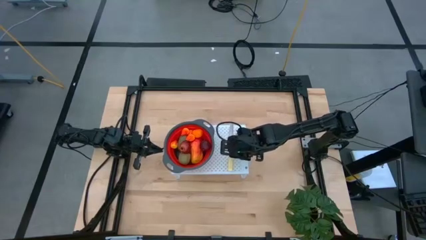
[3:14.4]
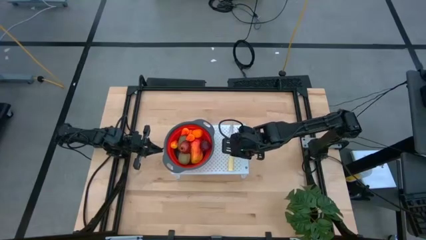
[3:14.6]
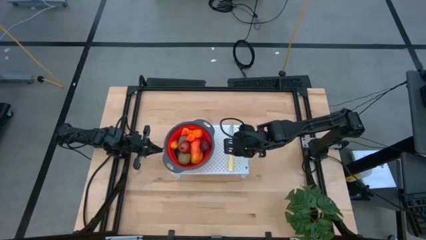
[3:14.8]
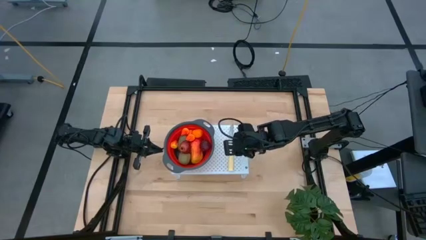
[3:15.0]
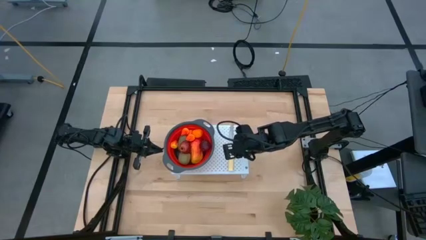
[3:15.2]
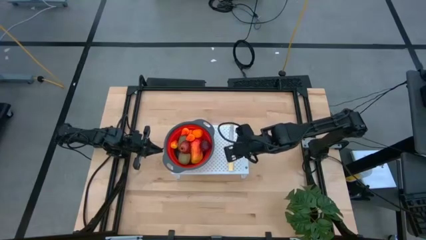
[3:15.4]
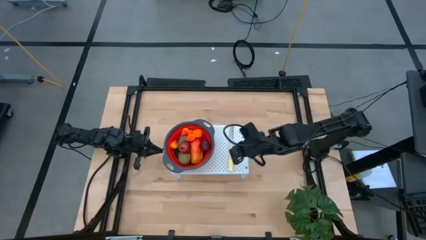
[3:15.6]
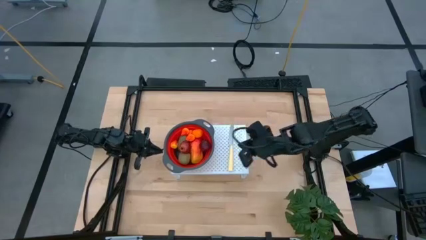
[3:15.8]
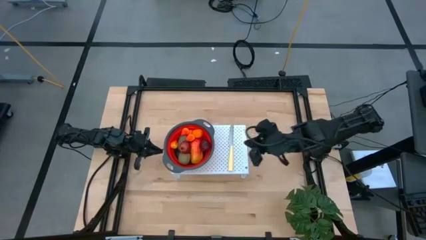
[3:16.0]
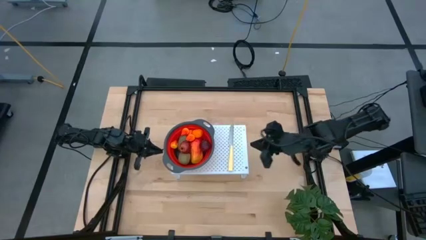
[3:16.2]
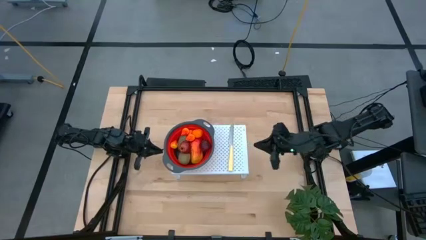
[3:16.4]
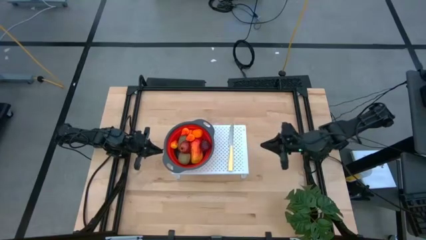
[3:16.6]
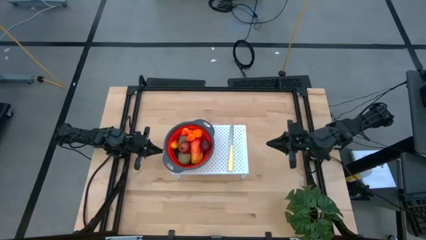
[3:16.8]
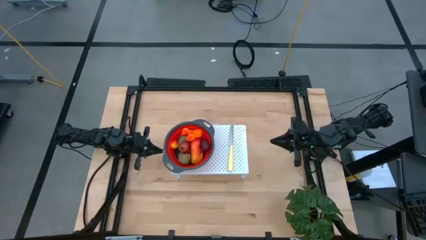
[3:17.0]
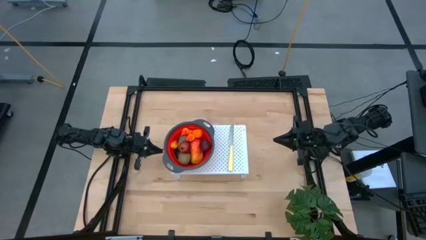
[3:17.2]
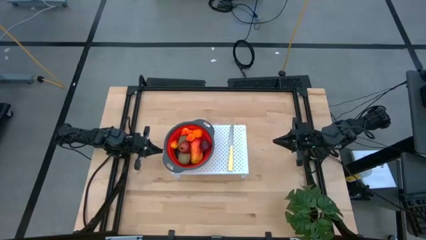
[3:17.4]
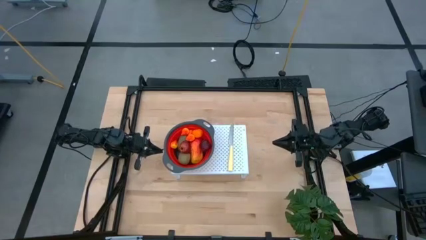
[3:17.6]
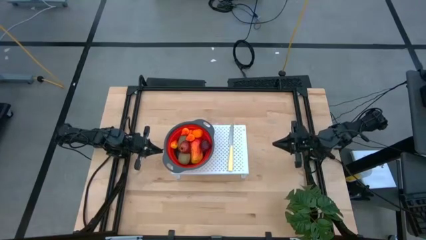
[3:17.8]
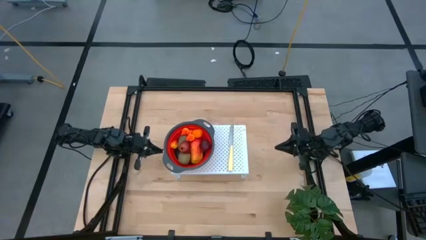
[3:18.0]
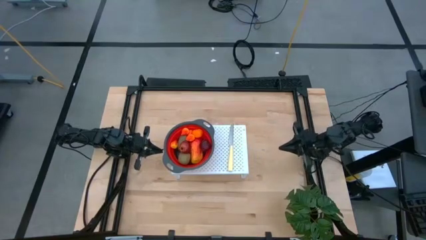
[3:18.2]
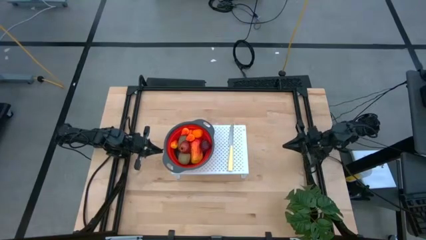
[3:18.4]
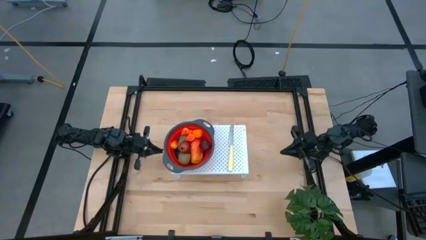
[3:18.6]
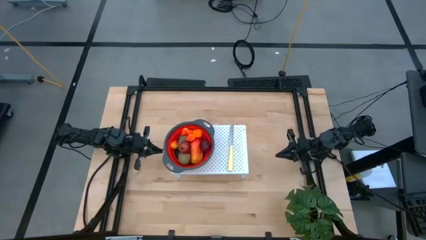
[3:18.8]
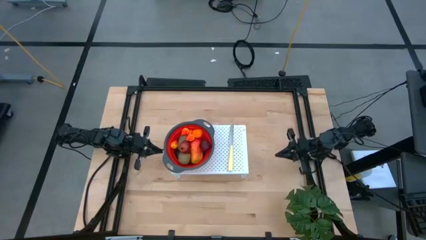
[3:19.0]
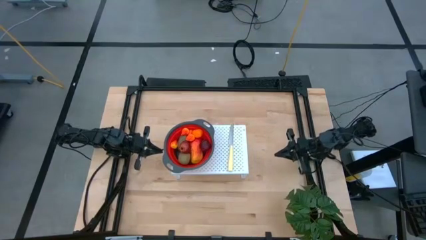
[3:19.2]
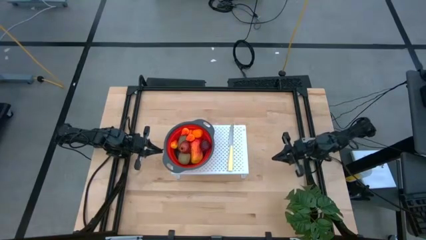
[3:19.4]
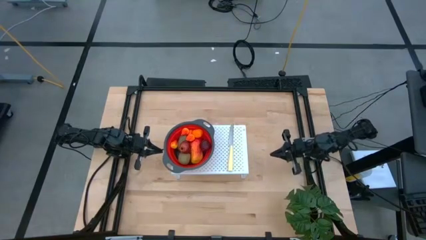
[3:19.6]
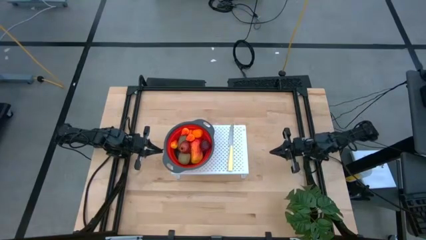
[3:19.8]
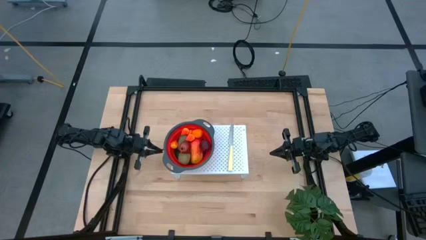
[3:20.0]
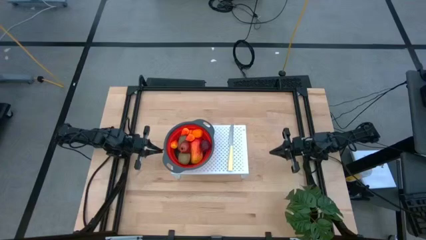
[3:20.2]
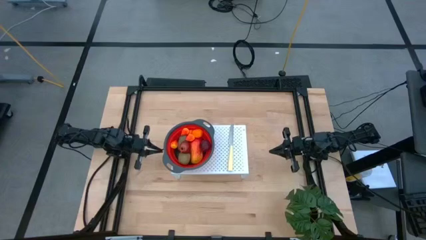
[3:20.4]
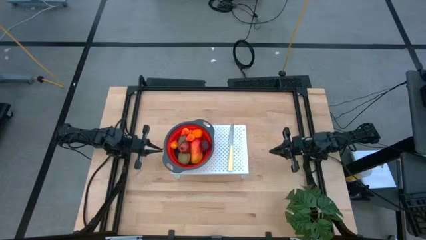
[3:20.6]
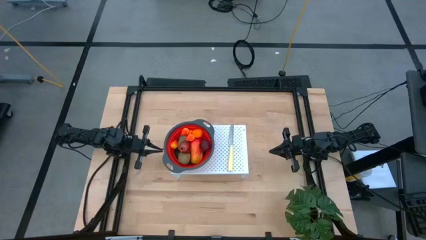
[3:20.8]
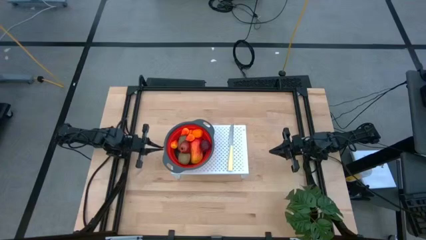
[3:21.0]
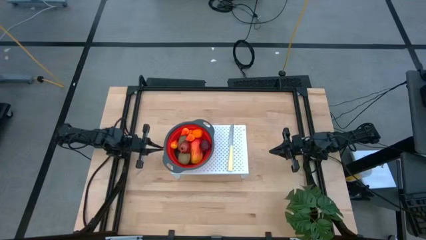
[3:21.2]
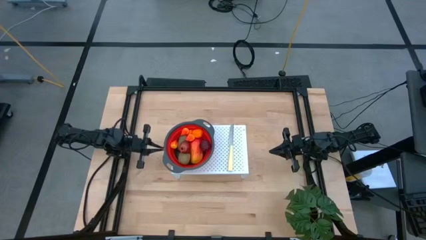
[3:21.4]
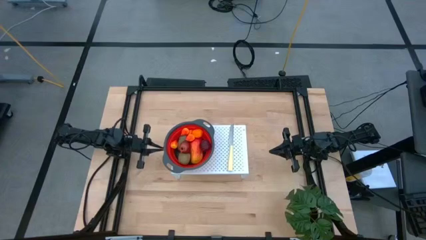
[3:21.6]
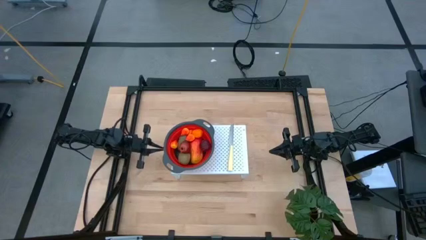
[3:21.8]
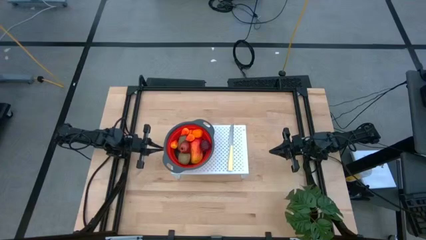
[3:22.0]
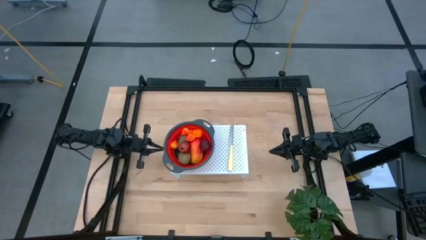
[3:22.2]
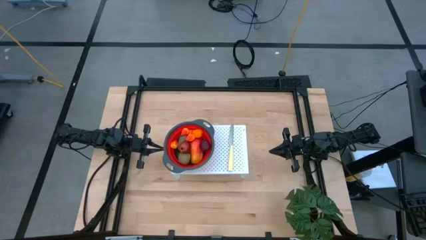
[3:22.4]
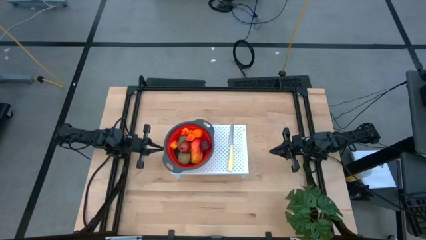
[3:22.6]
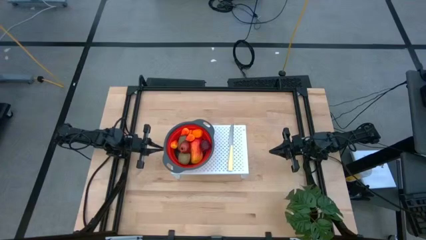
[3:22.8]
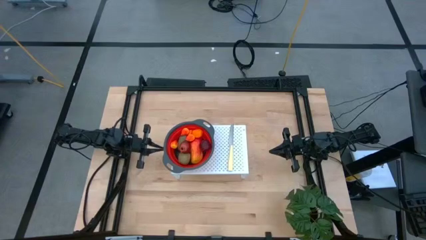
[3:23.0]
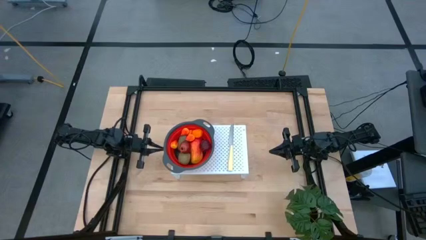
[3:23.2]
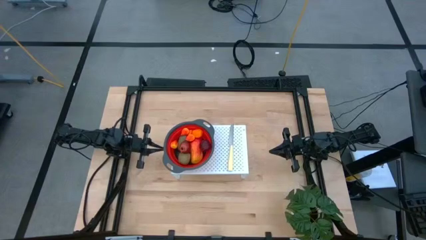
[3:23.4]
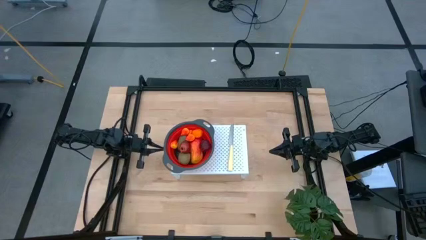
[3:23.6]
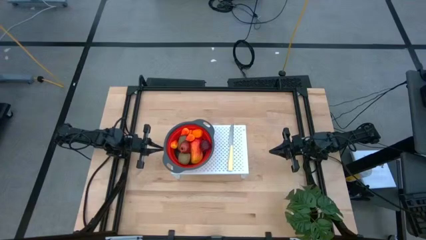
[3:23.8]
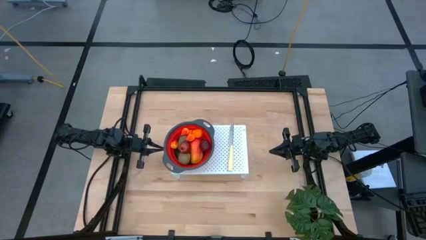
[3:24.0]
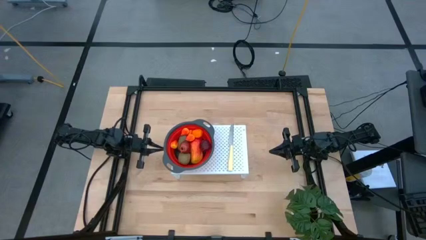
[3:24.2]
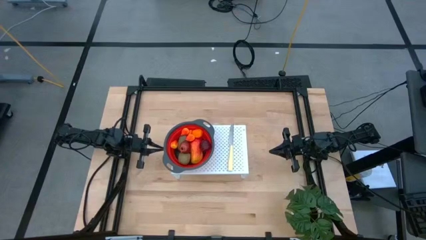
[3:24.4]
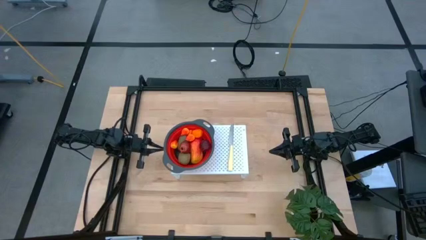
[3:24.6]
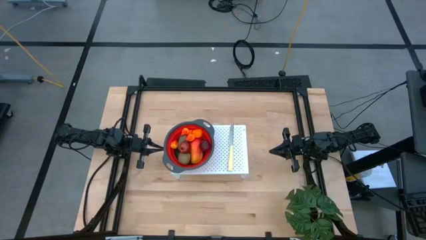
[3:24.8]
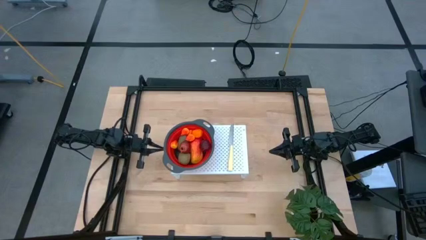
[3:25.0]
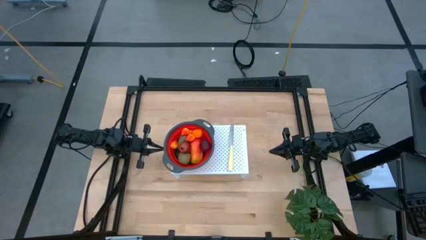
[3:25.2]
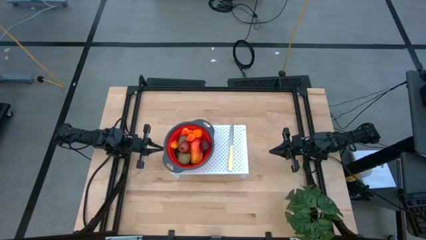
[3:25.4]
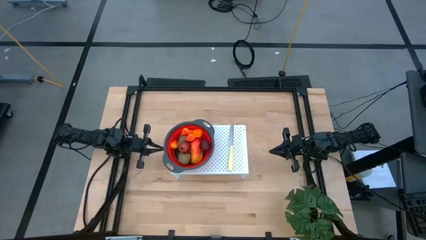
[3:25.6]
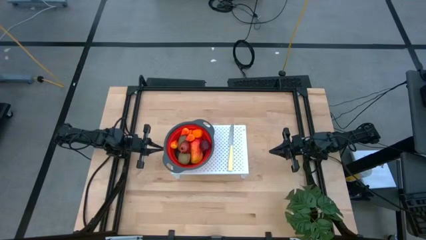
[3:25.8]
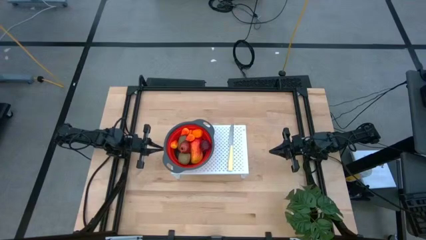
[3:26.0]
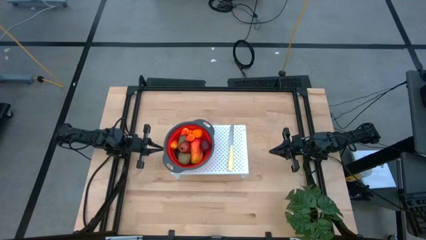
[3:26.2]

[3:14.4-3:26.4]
Task: Pick & Place Fruit
Return to Home Position
